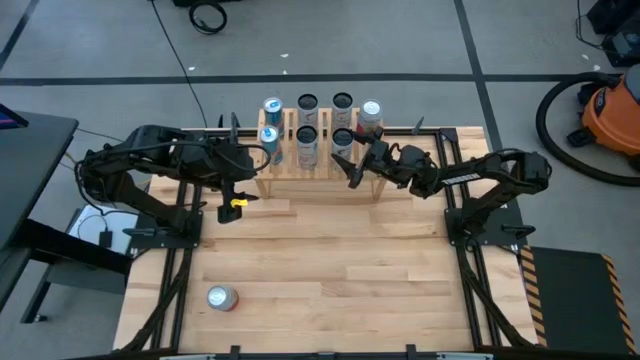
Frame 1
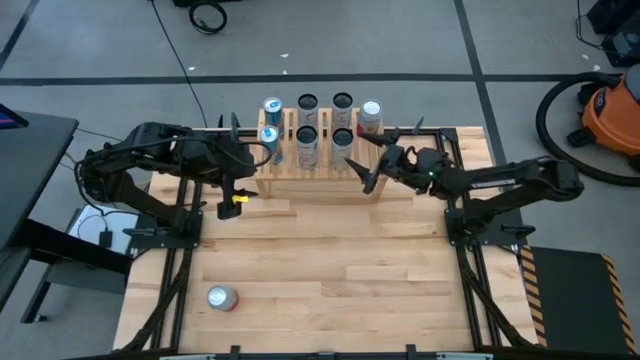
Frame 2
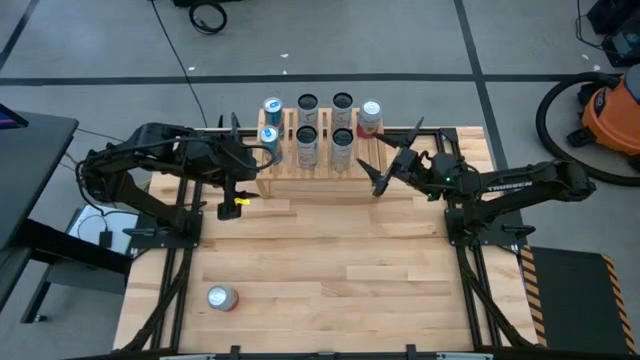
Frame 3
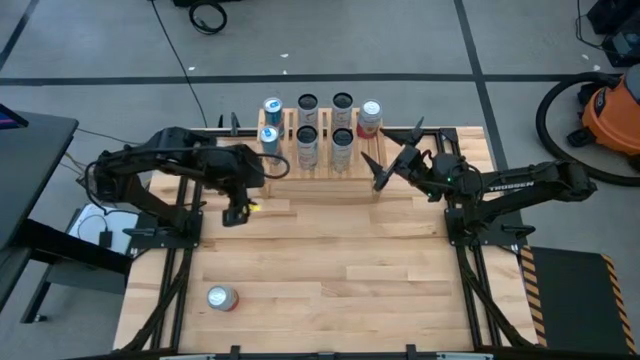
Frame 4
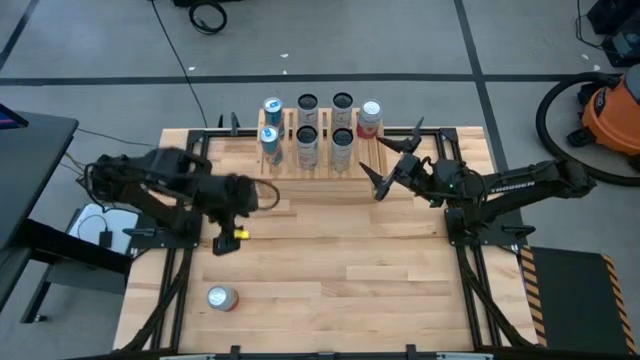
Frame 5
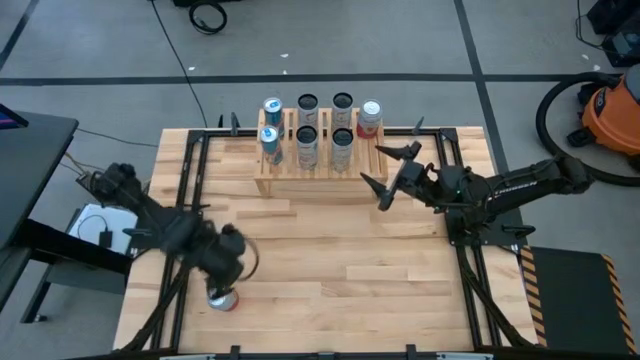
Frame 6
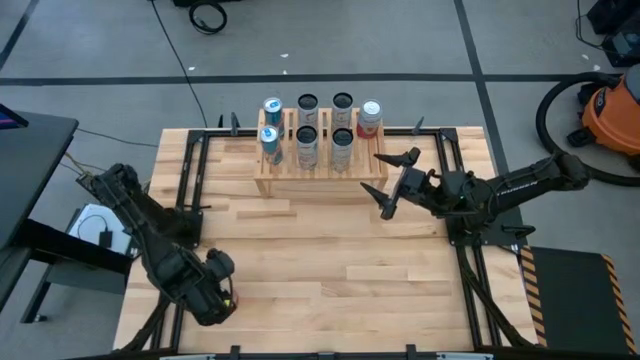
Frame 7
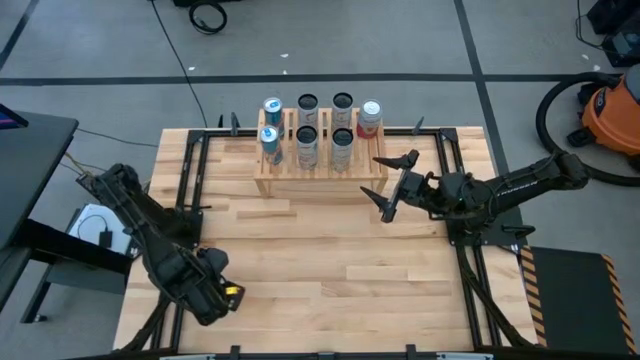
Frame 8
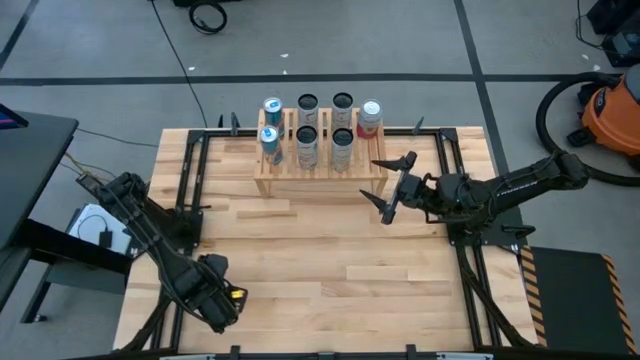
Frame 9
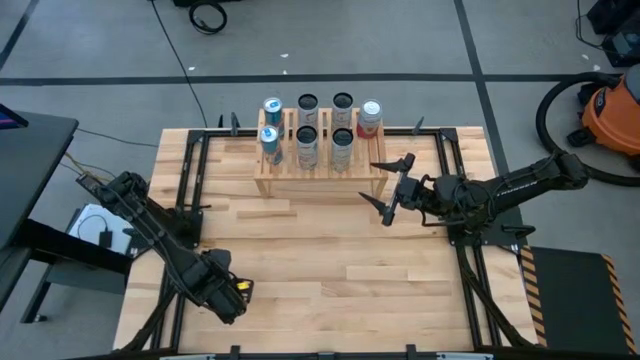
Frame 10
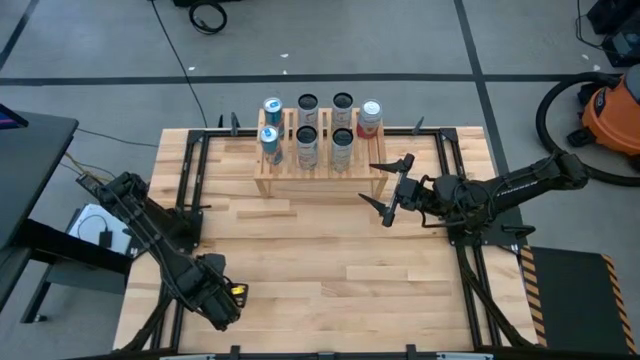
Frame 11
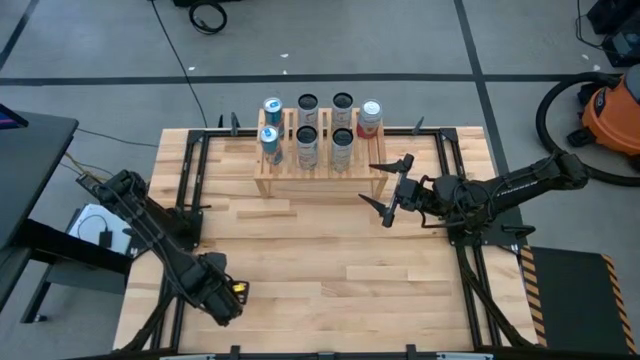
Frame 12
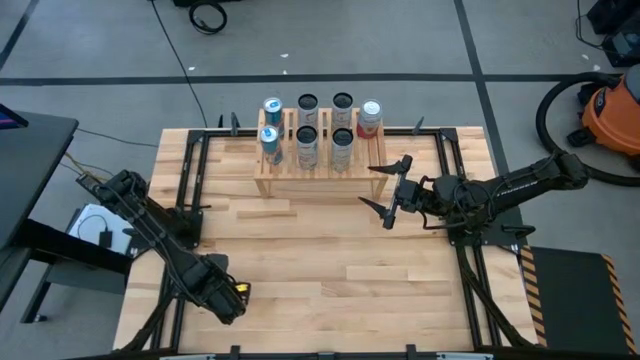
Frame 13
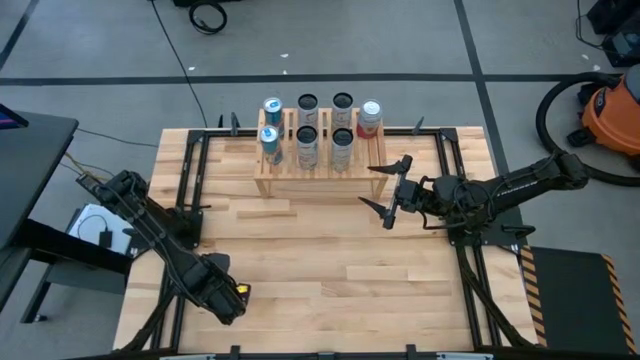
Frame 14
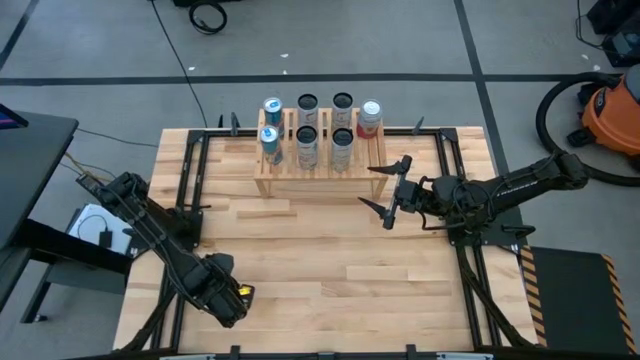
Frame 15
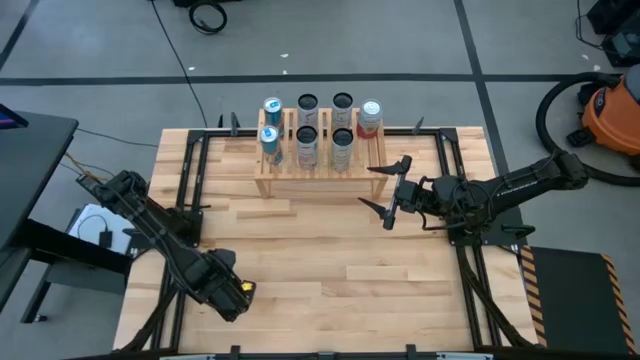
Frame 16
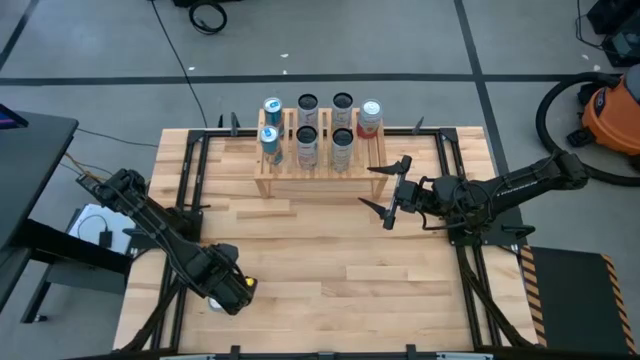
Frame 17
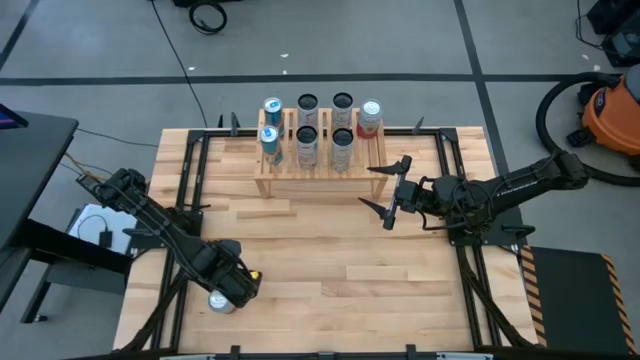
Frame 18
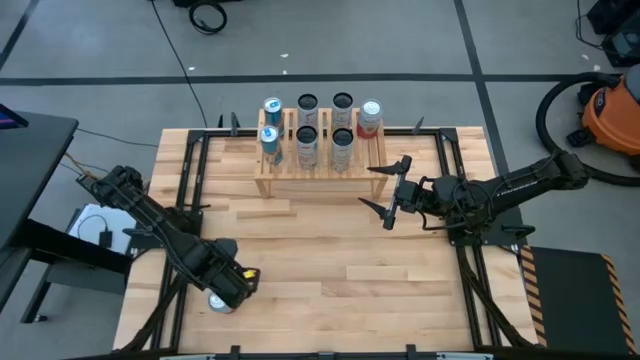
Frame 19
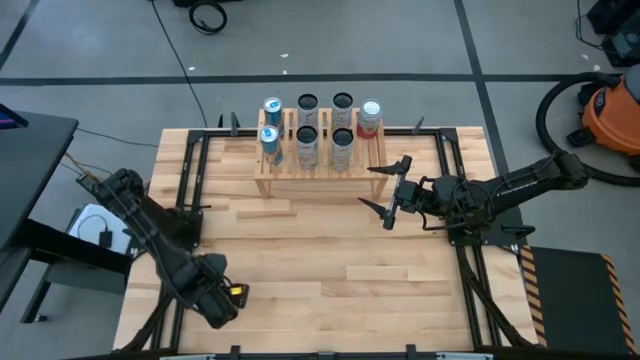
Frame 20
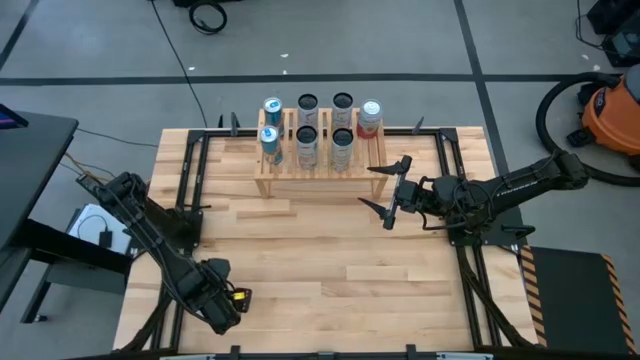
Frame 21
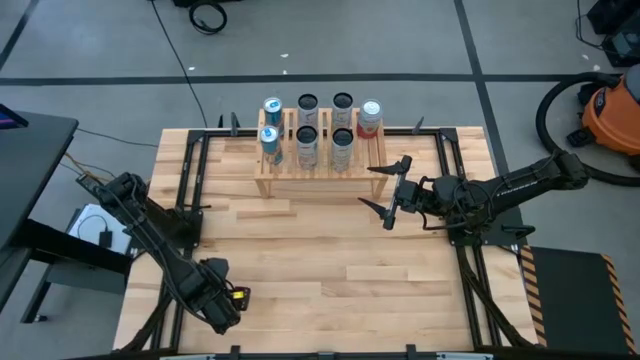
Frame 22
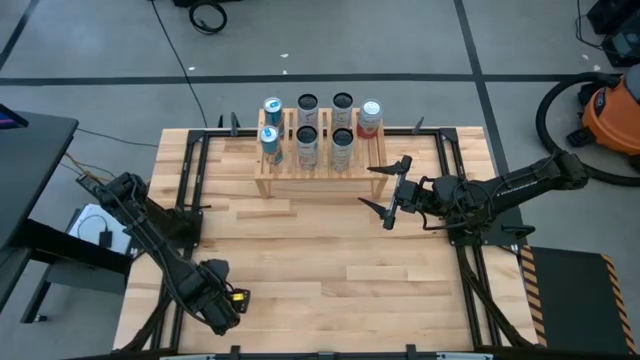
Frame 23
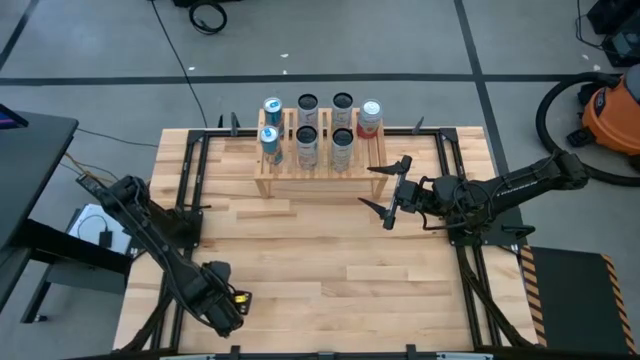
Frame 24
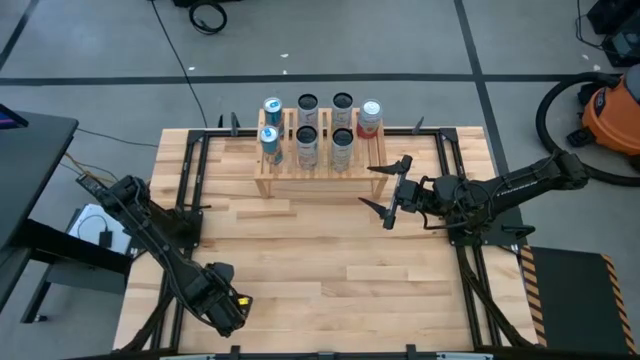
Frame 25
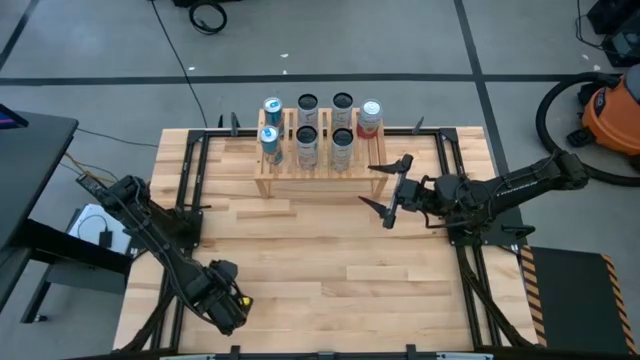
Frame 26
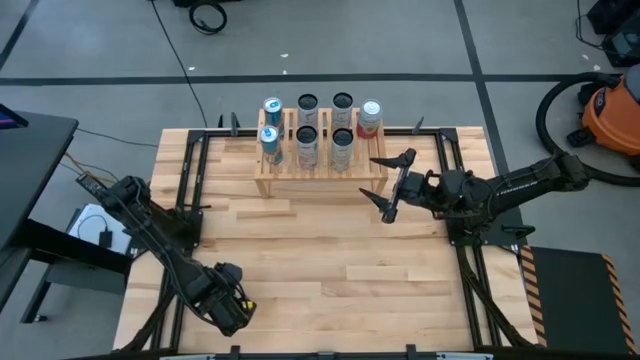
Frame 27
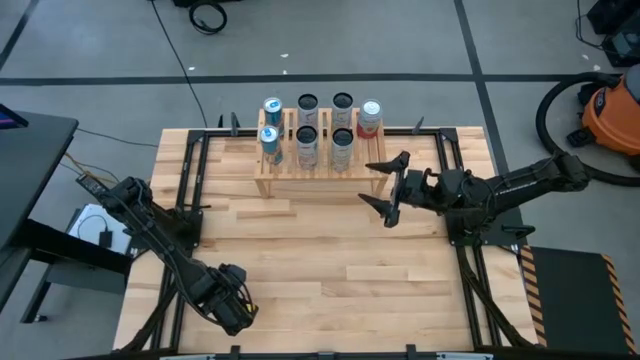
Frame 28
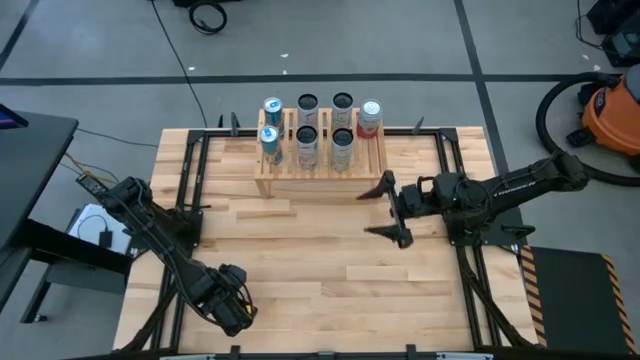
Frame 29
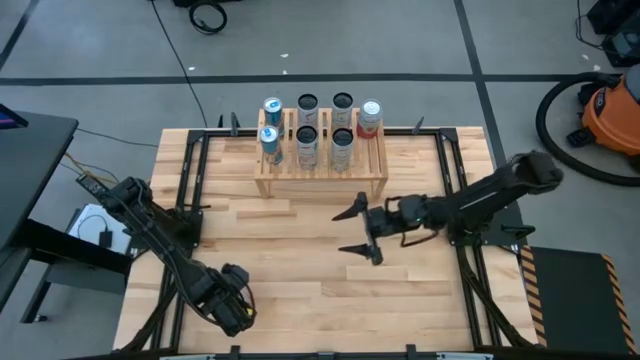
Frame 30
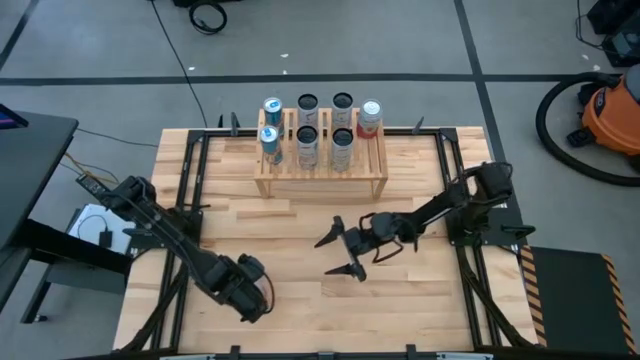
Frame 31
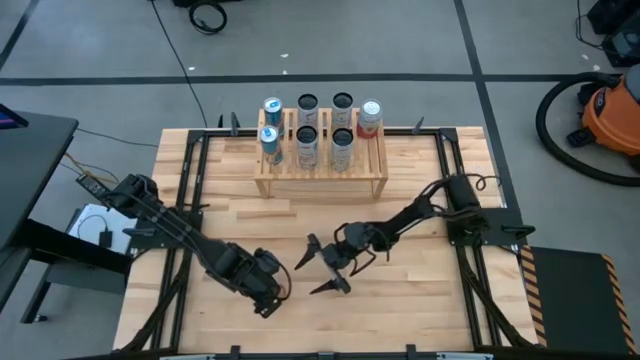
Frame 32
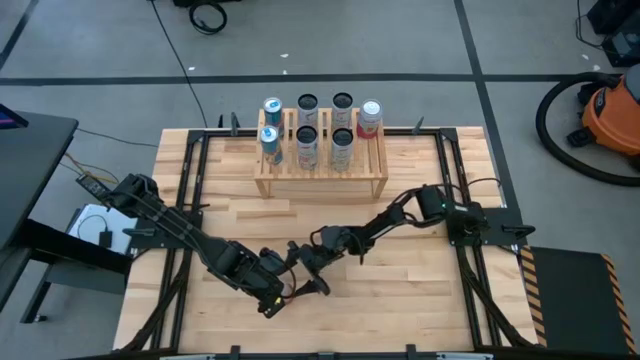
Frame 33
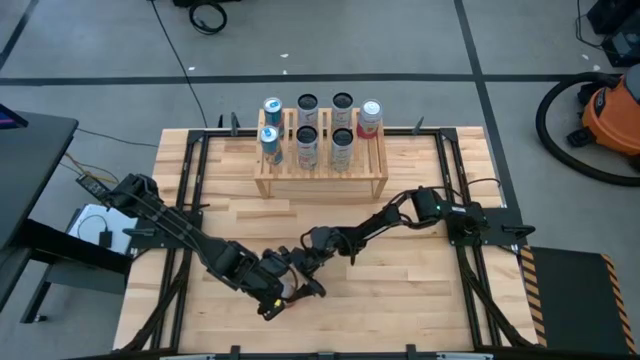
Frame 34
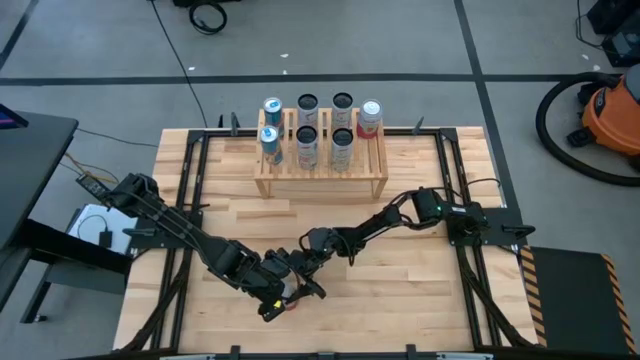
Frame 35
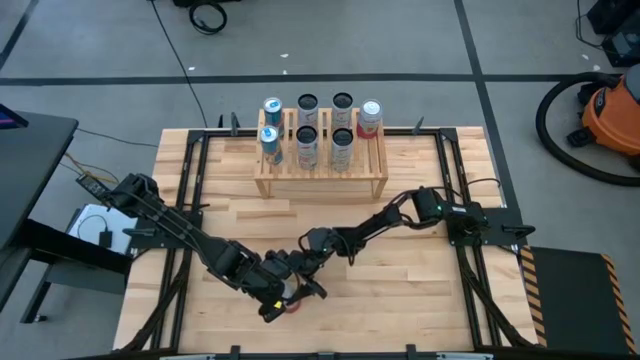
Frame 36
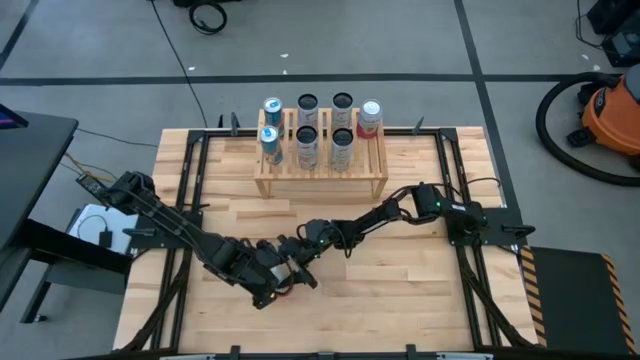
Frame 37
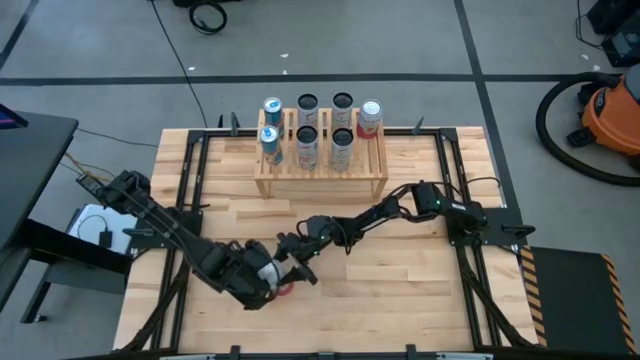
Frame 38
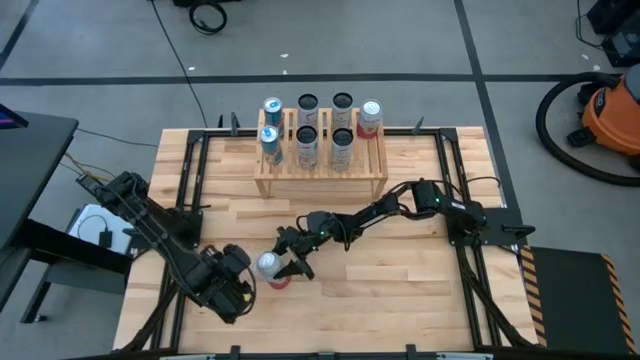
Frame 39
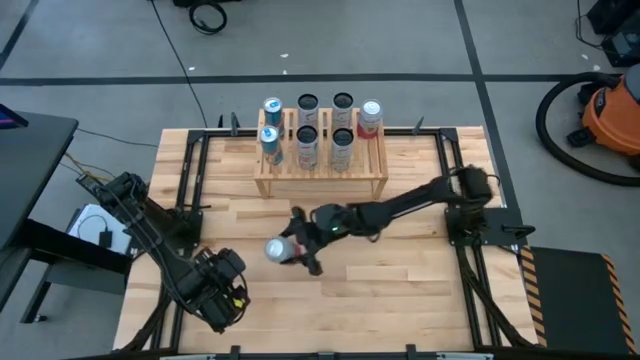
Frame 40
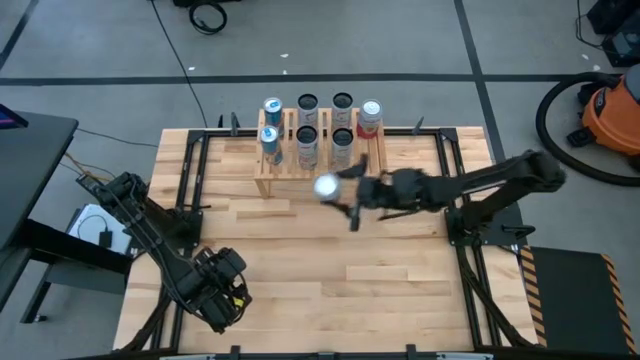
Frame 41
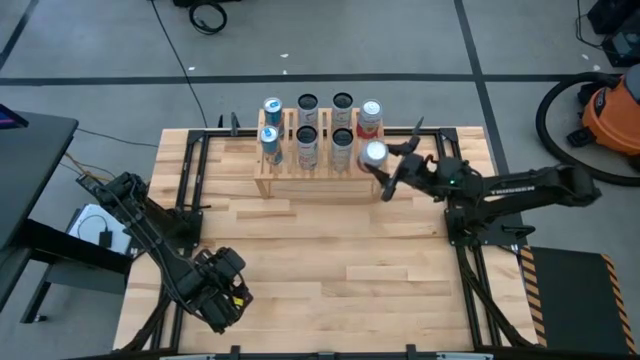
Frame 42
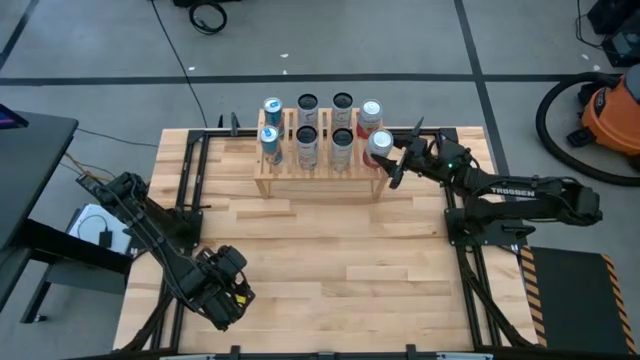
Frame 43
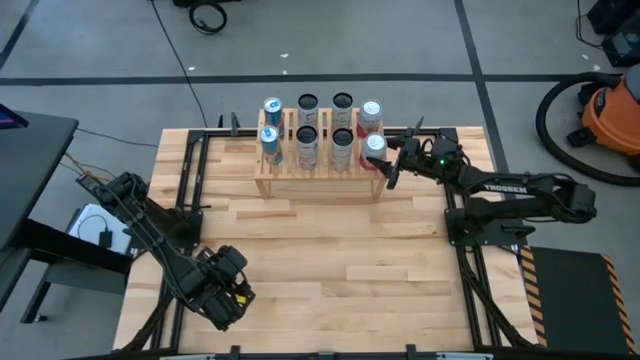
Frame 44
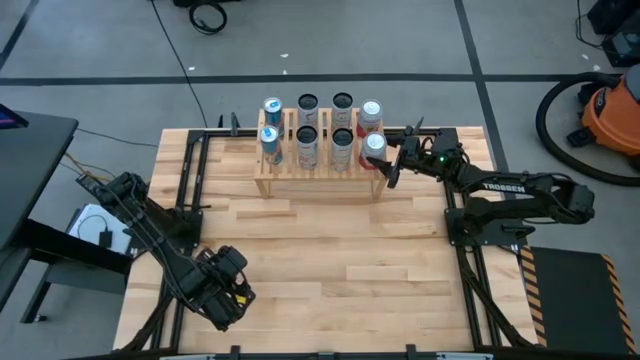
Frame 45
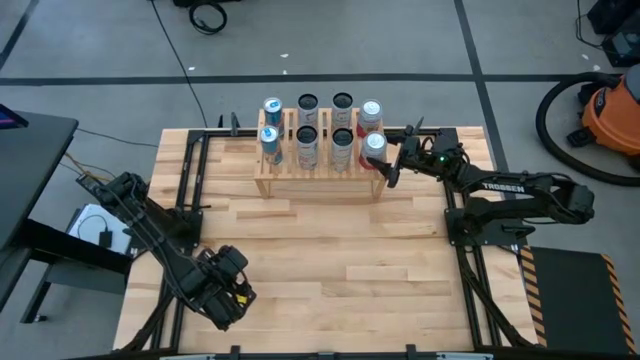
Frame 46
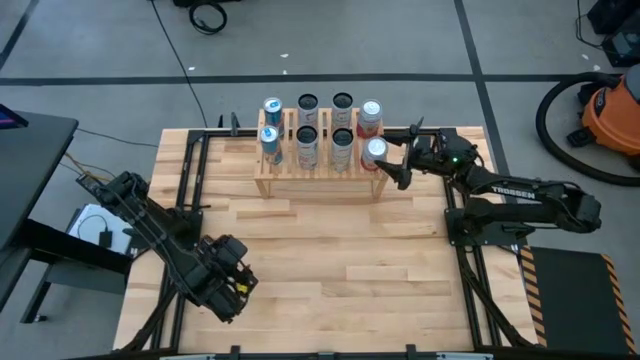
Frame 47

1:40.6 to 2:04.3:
Task: Place canned beverage on shelf
Put the pink white soda can on the shelf aligned with the other pink white soda can
